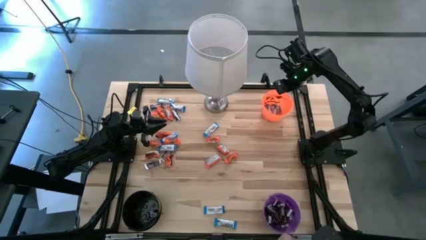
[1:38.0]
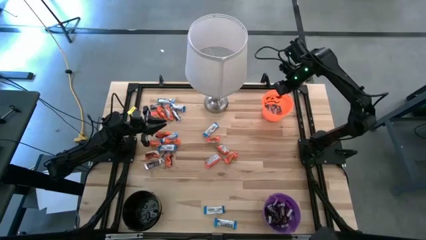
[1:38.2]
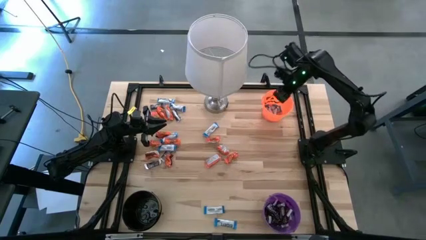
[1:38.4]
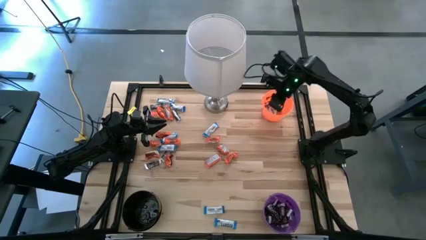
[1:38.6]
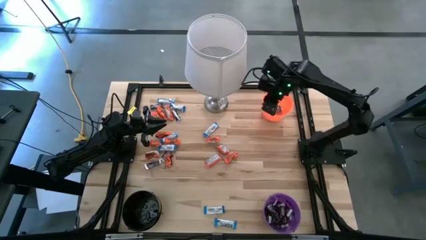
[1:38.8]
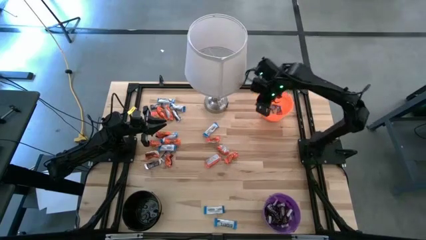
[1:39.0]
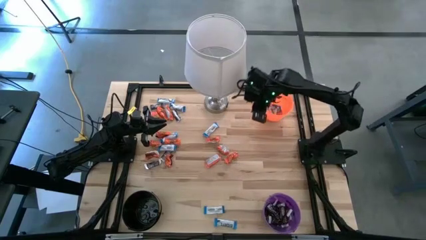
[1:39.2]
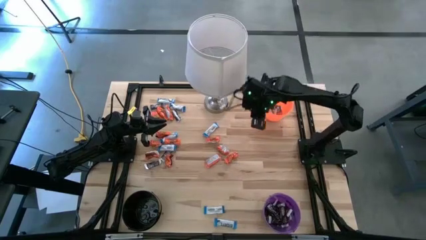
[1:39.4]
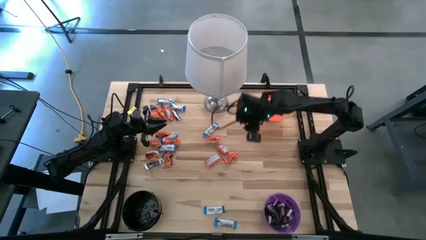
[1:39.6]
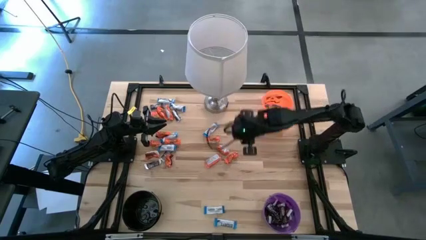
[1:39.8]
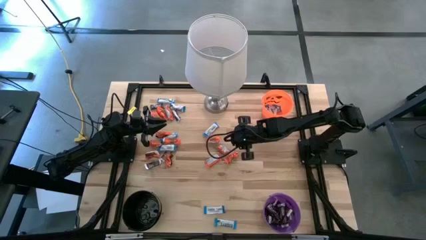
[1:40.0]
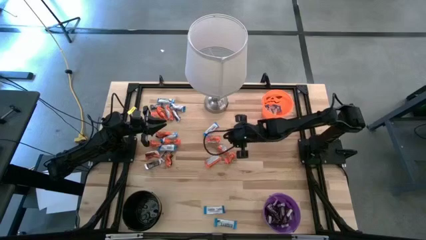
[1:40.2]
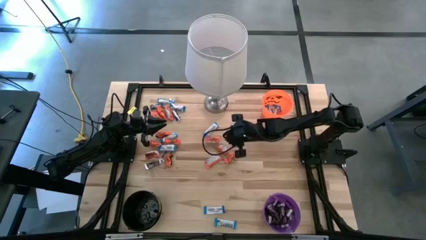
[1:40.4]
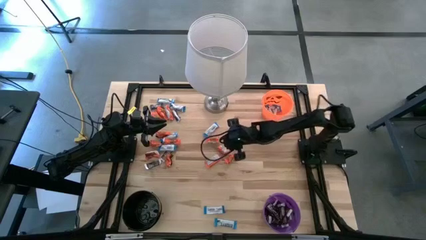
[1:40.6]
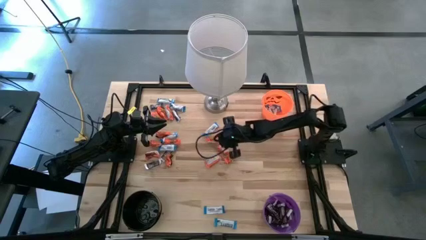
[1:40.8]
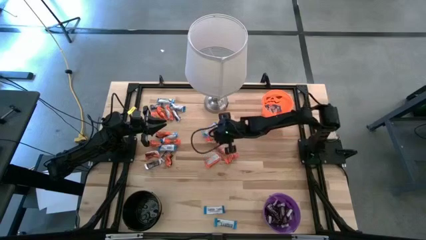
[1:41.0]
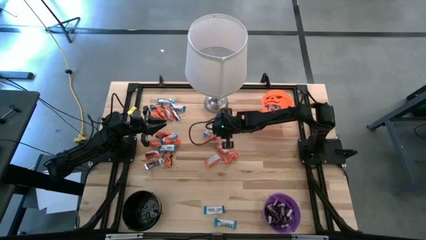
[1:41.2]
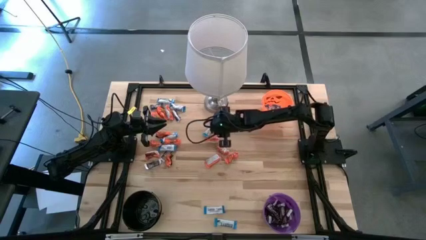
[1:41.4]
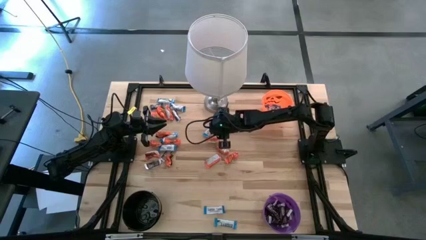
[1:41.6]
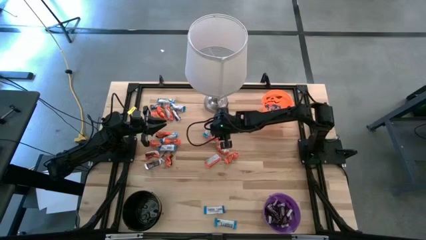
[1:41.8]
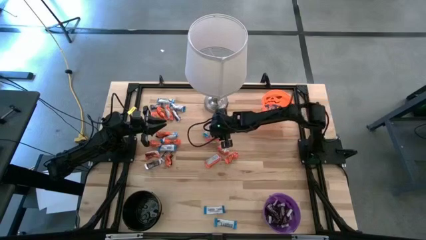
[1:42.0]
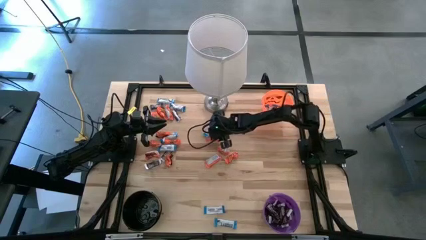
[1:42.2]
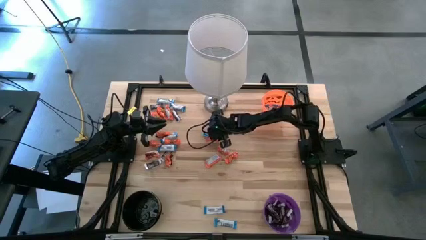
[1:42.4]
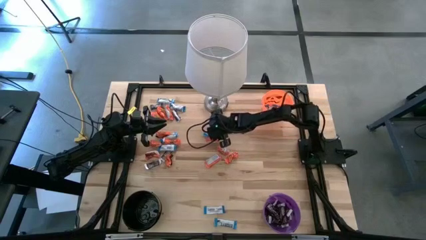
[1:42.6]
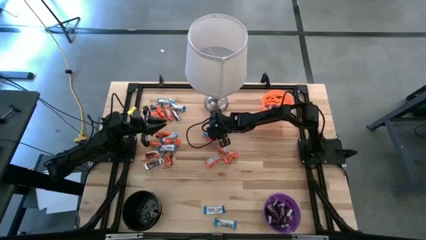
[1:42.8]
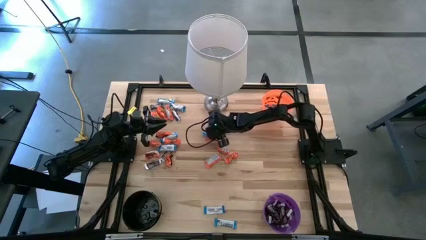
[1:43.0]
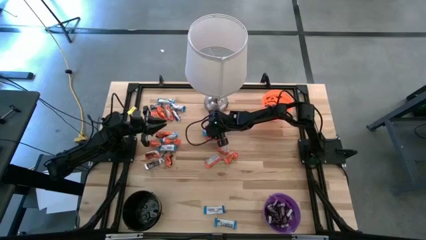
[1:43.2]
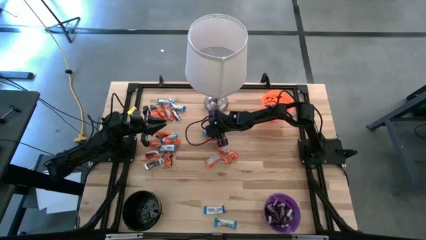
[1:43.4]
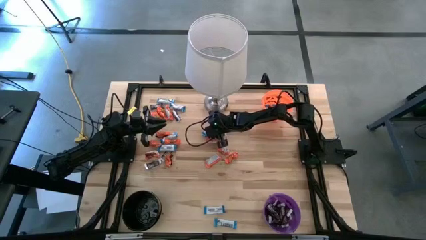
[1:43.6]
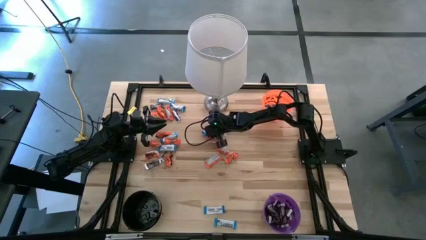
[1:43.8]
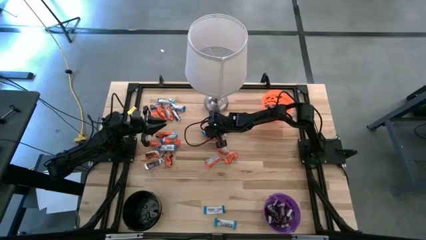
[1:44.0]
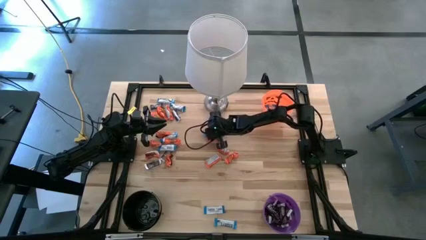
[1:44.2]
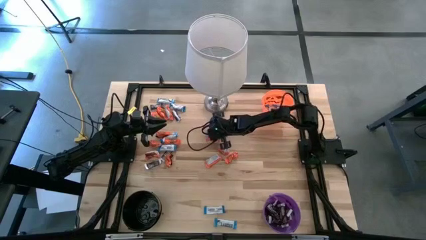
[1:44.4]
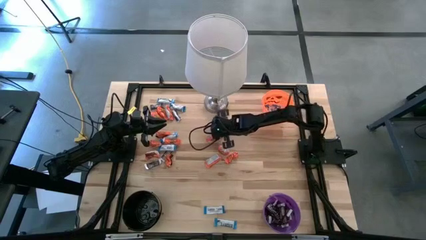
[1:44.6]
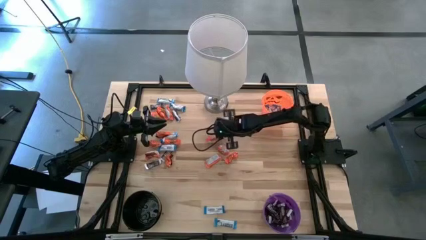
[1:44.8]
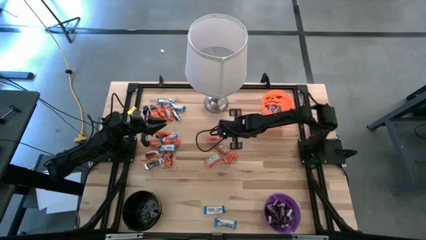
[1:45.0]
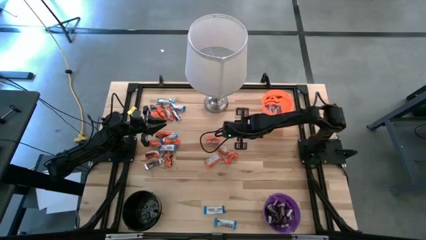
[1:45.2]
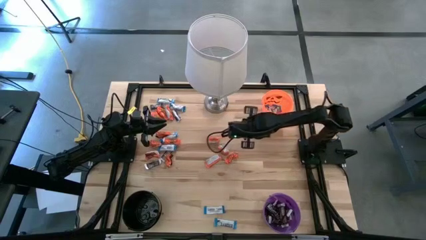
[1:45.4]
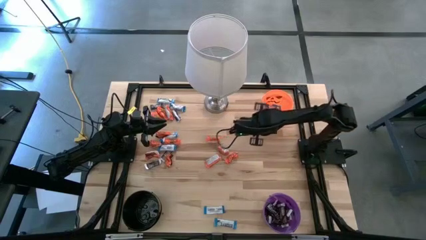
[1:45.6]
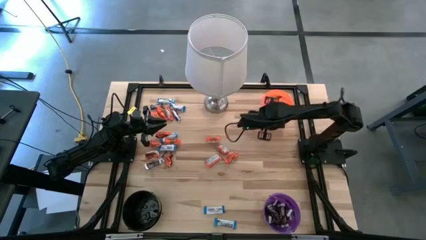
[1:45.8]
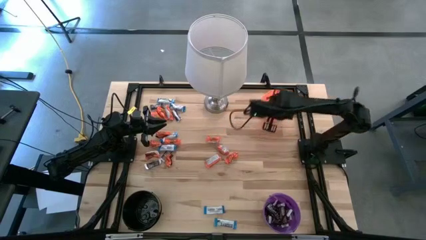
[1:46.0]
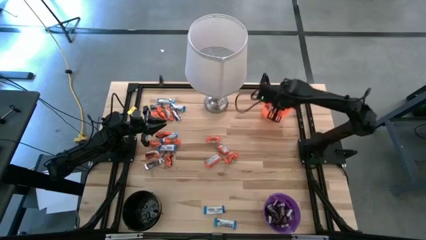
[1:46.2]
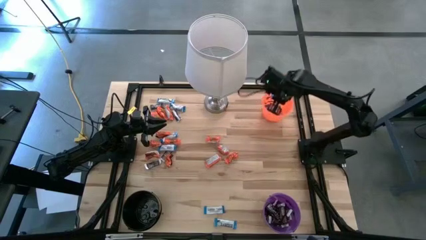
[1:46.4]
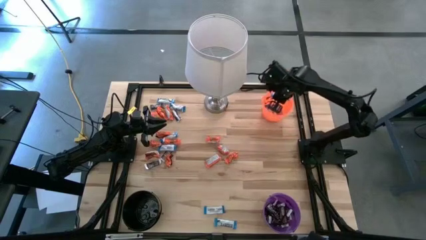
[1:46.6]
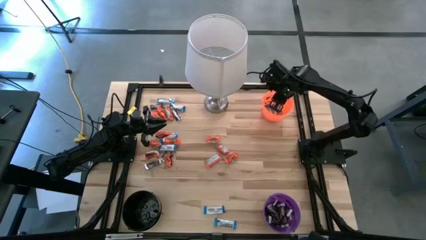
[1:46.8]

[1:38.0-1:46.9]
Task: Sort candy
Put the white chocolate bar into the orange bucket

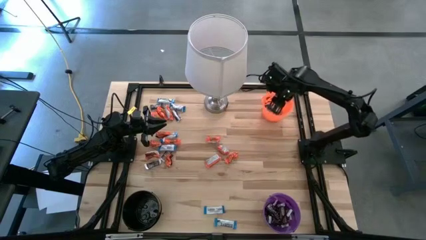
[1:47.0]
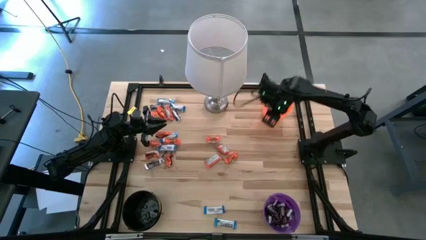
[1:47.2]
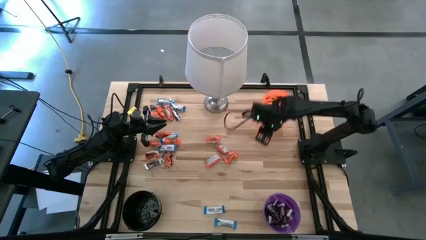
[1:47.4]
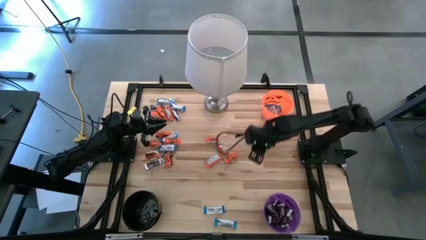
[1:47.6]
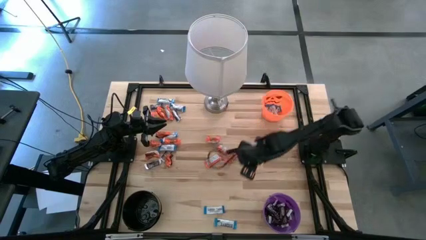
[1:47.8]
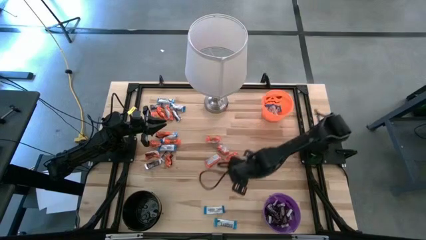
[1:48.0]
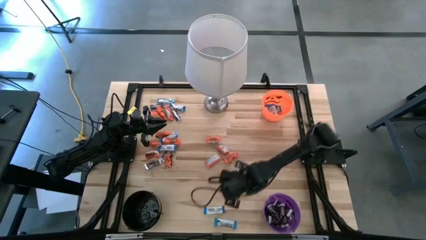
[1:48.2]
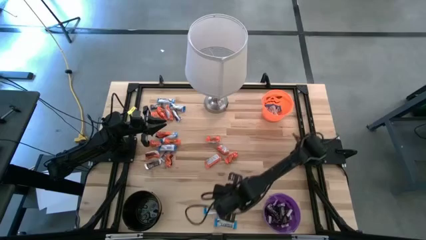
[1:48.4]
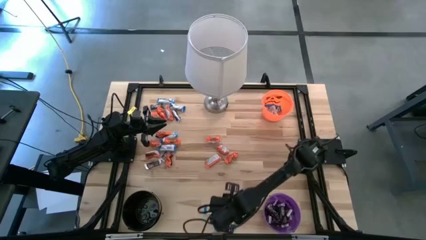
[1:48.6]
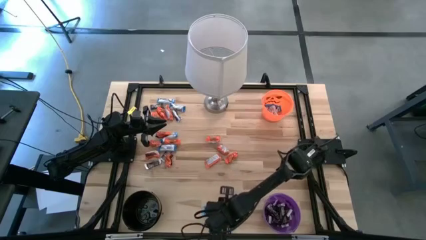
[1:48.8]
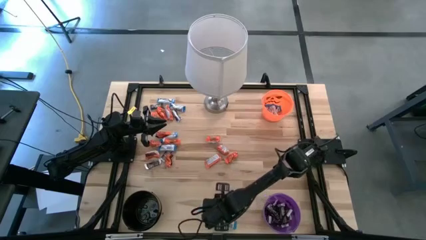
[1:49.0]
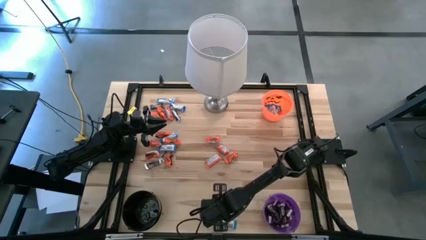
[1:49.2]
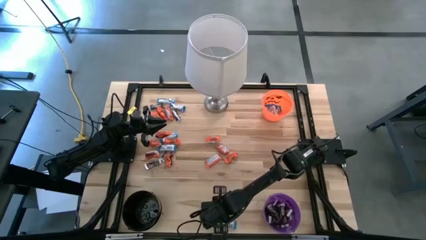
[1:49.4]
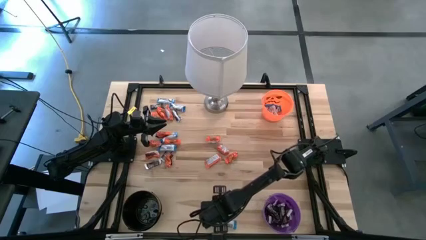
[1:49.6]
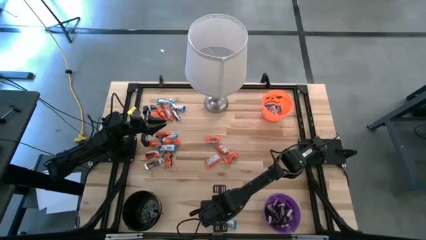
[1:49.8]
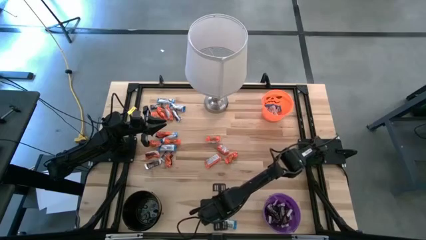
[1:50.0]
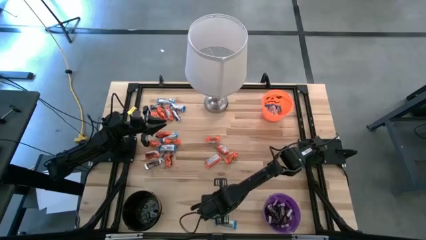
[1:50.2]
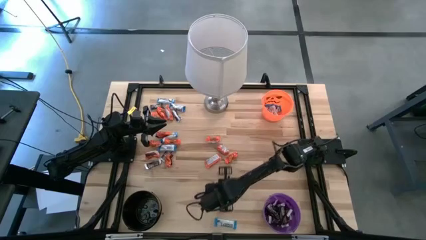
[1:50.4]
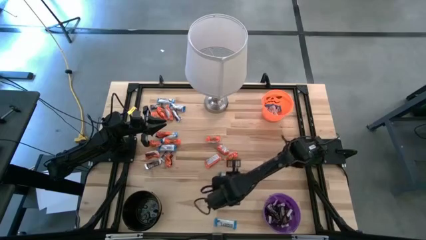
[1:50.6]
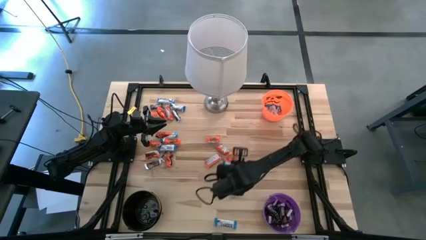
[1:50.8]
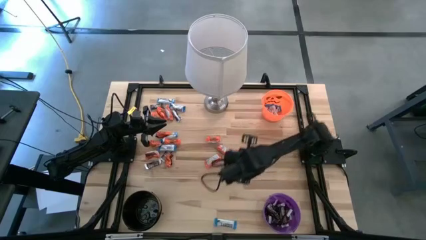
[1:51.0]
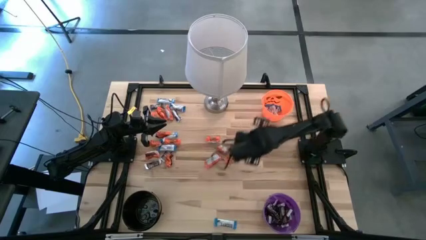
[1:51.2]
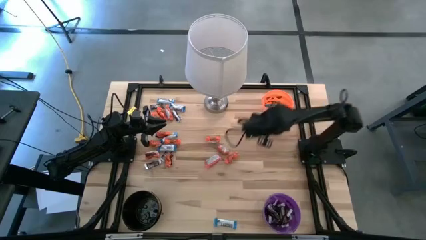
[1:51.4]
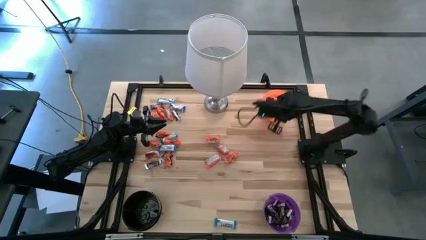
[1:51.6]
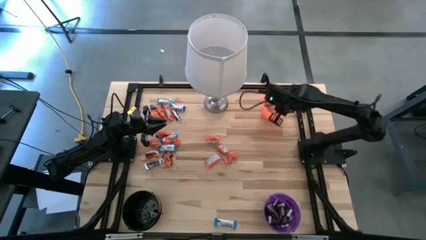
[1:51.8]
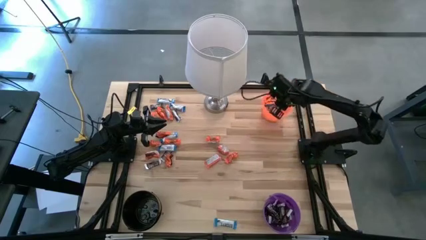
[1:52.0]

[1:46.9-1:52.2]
Put the white chocolate bar into the orange bucket

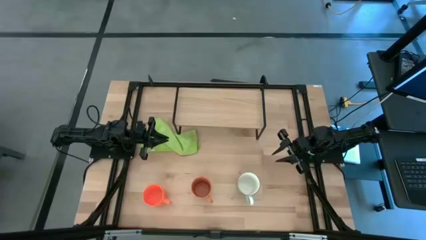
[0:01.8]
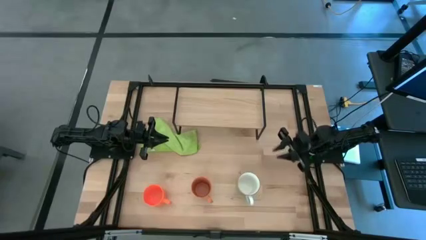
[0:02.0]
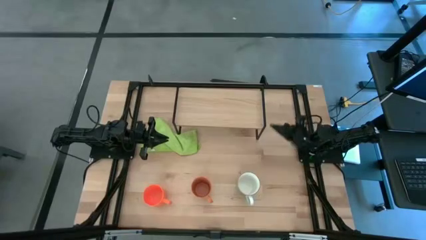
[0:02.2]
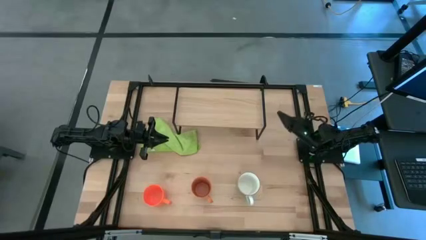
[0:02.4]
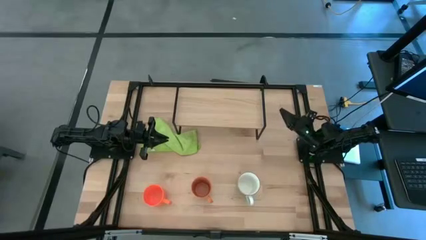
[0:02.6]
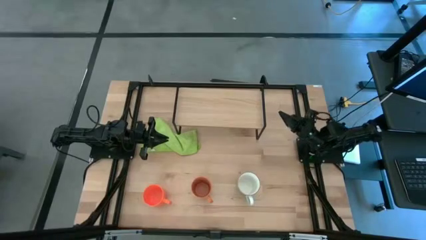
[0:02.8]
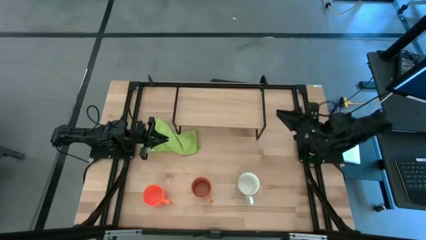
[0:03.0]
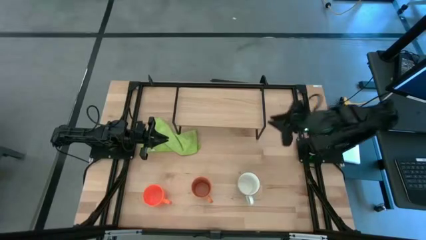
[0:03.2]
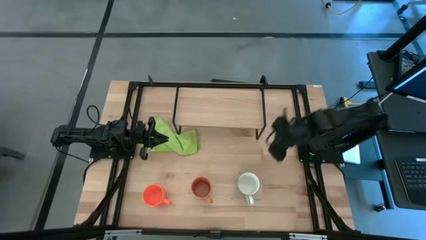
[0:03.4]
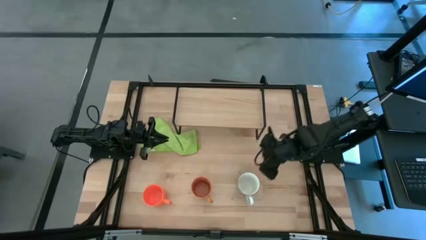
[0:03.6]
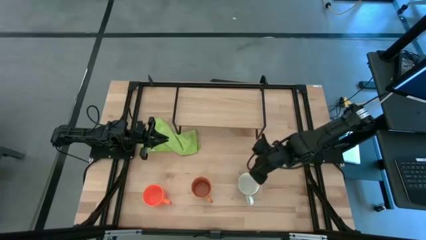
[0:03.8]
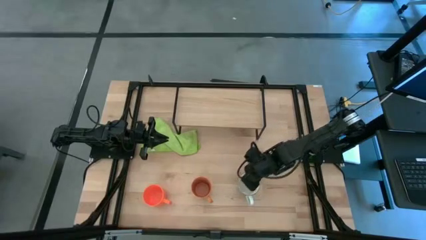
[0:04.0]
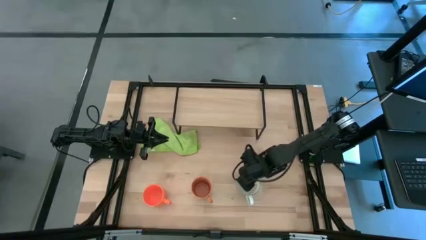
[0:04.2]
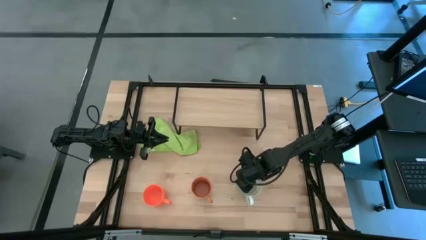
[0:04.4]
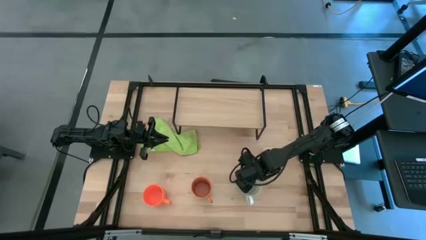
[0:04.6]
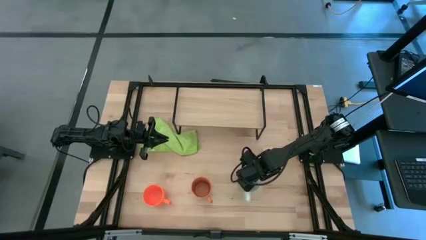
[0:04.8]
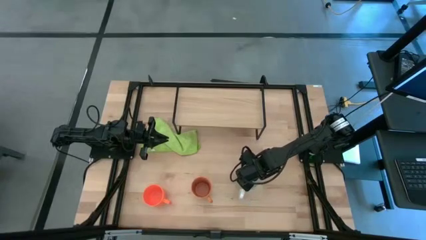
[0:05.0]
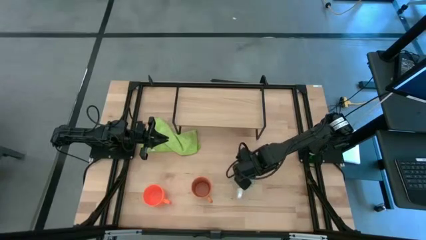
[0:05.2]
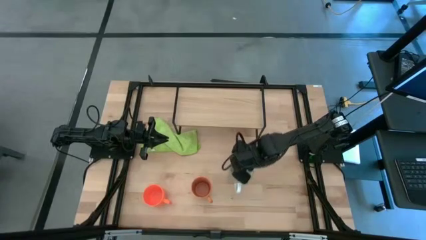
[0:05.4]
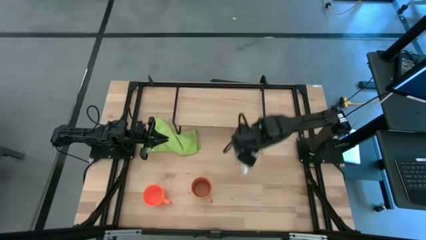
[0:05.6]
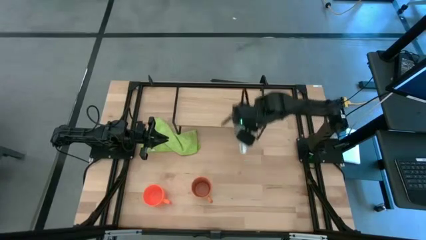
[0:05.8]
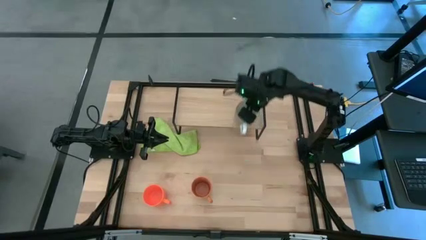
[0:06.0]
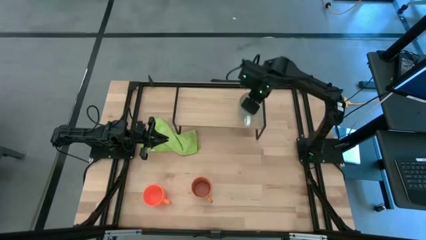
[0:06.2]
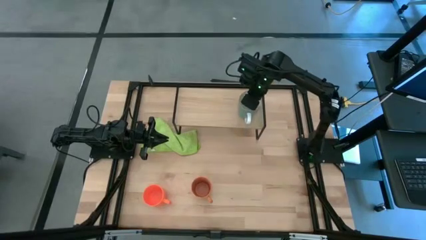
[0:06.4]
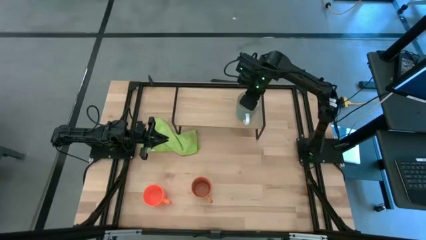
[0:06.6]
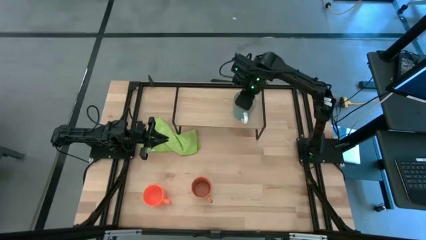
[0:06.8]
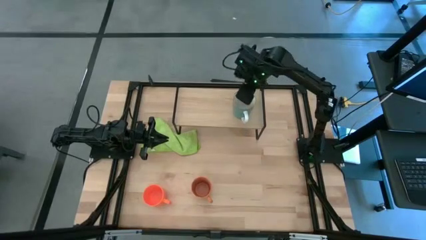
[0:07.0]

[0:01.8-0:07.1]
Task: Stack small to large cups/mugs on shelf
Put the green mug on the shelf
